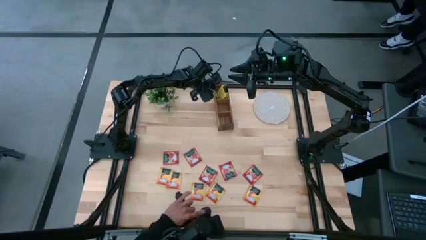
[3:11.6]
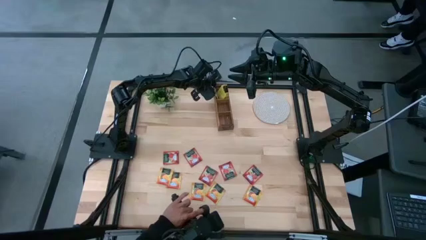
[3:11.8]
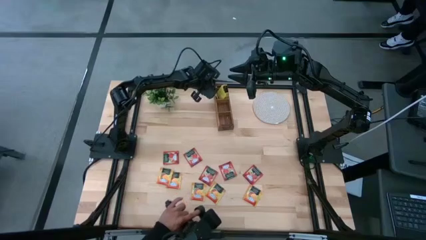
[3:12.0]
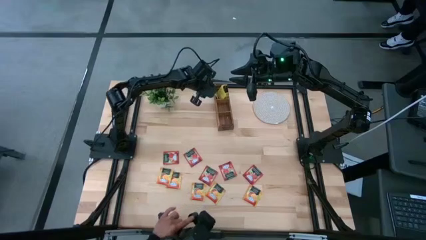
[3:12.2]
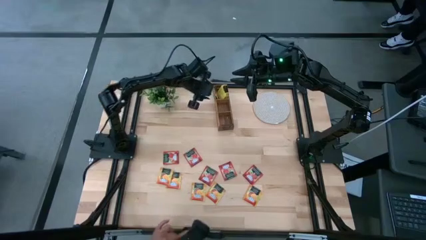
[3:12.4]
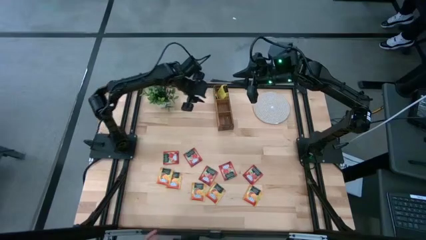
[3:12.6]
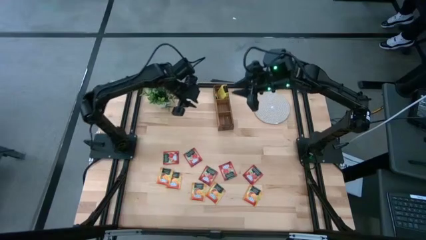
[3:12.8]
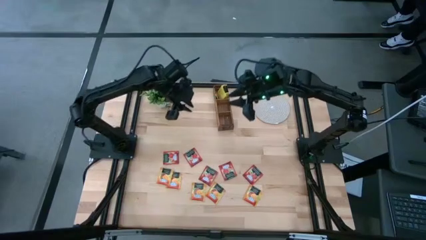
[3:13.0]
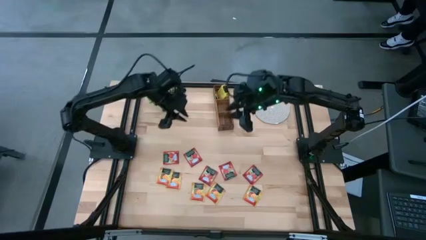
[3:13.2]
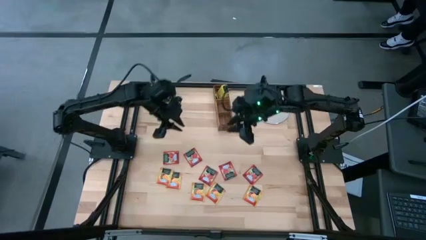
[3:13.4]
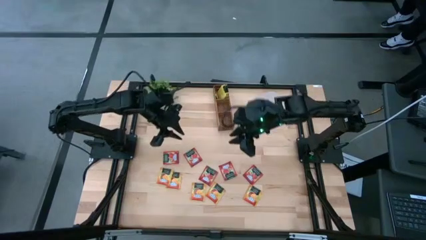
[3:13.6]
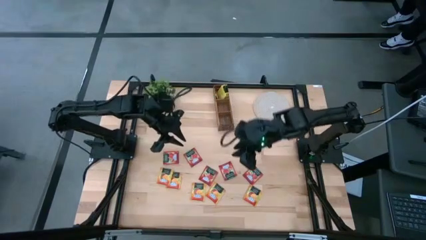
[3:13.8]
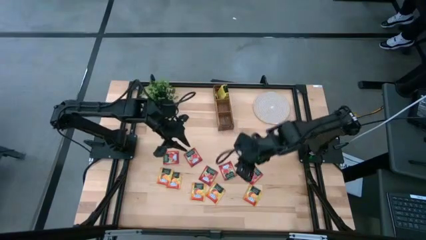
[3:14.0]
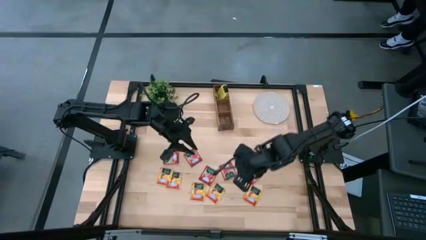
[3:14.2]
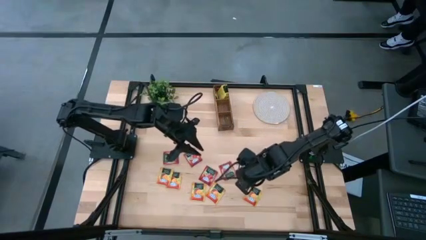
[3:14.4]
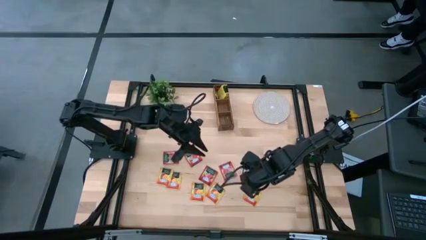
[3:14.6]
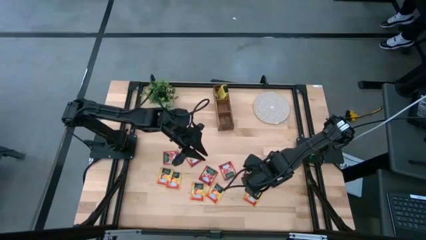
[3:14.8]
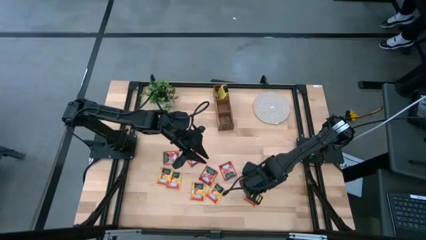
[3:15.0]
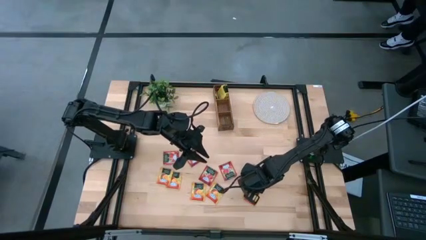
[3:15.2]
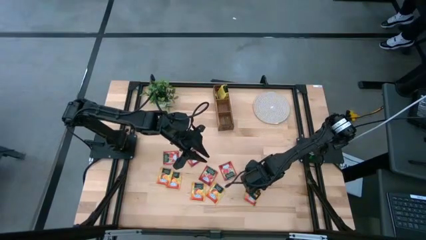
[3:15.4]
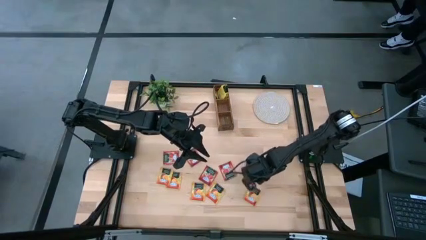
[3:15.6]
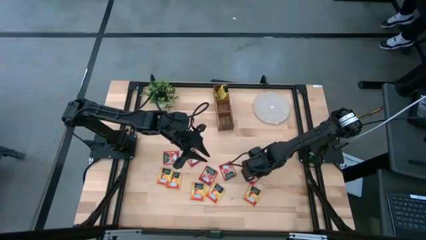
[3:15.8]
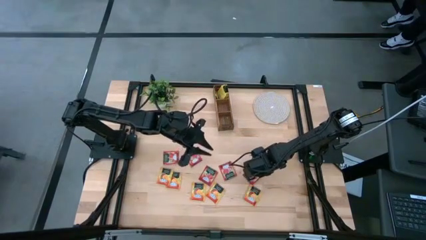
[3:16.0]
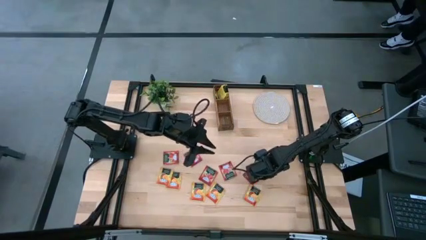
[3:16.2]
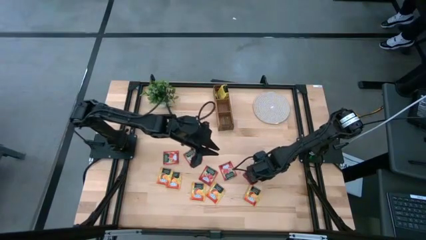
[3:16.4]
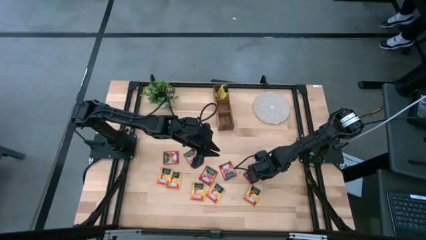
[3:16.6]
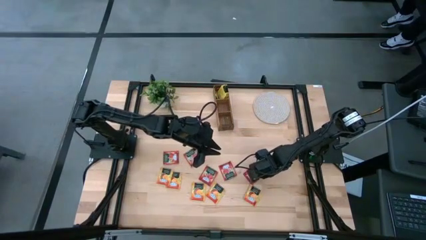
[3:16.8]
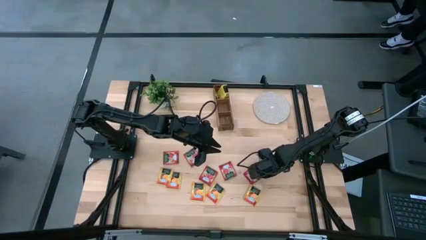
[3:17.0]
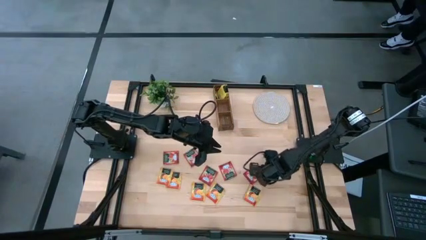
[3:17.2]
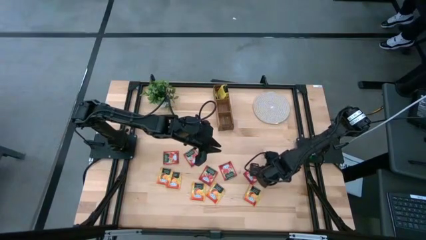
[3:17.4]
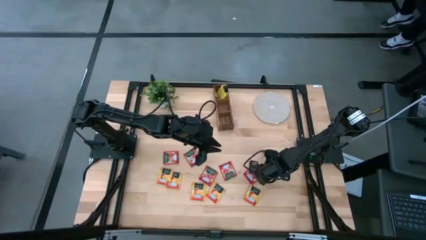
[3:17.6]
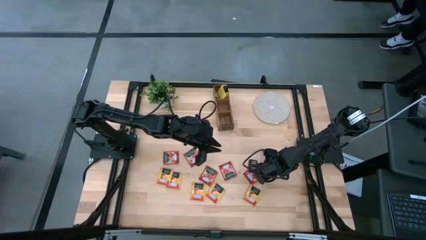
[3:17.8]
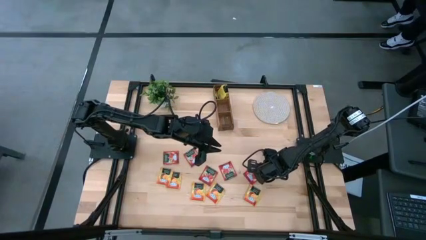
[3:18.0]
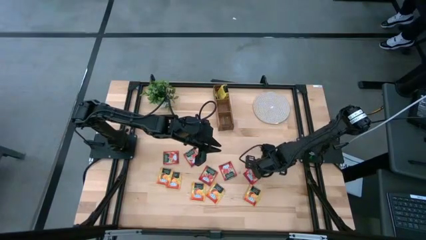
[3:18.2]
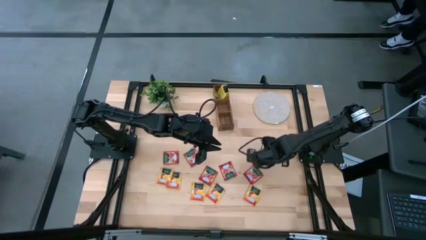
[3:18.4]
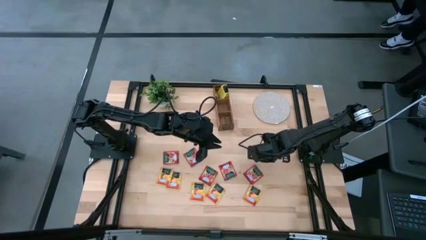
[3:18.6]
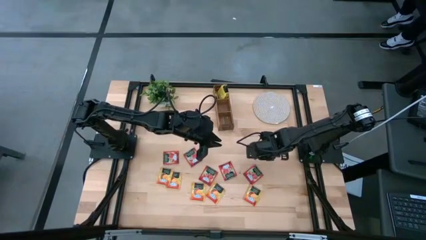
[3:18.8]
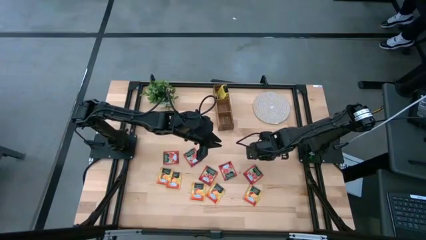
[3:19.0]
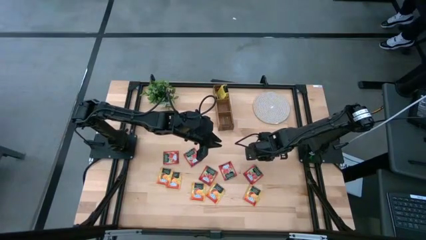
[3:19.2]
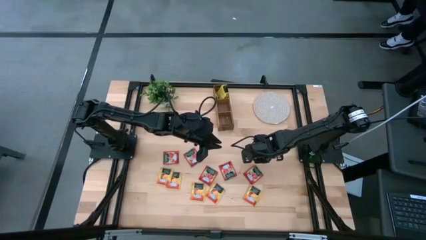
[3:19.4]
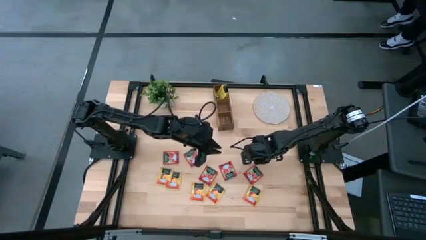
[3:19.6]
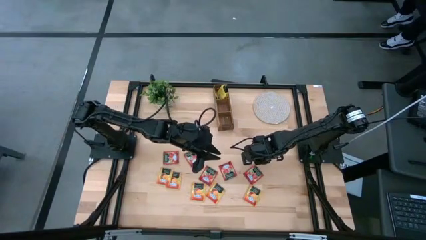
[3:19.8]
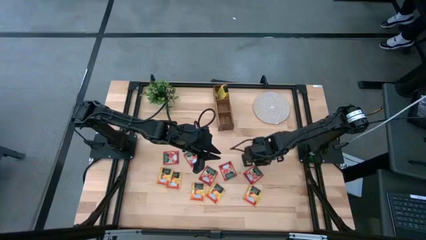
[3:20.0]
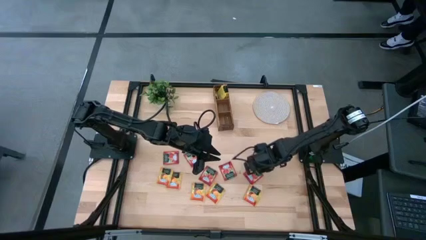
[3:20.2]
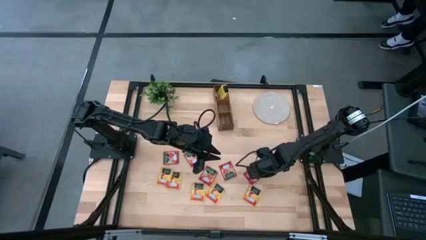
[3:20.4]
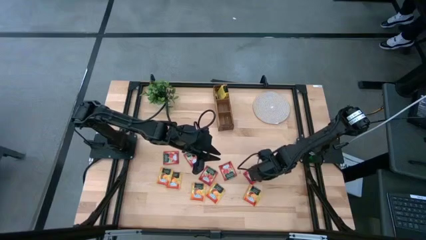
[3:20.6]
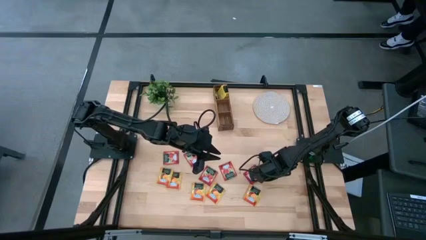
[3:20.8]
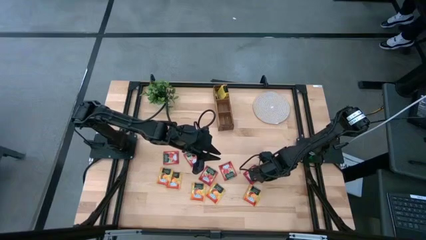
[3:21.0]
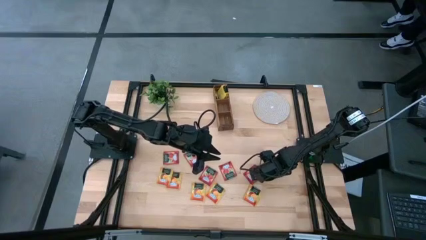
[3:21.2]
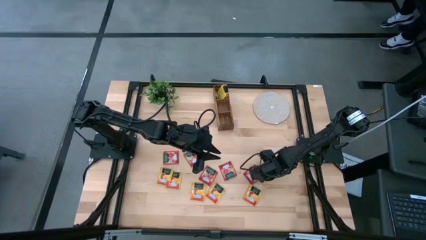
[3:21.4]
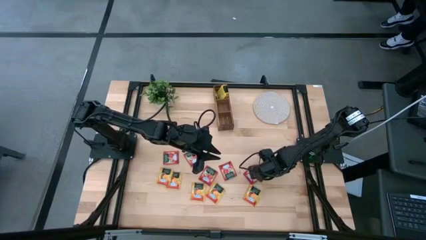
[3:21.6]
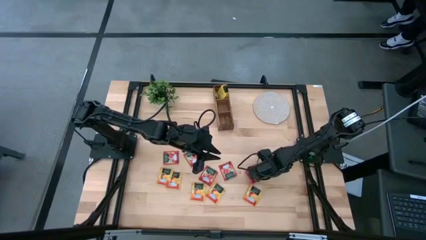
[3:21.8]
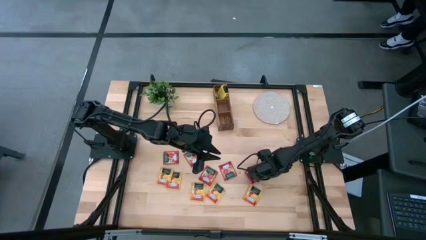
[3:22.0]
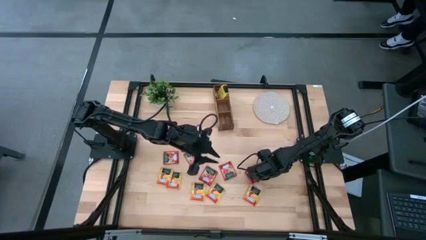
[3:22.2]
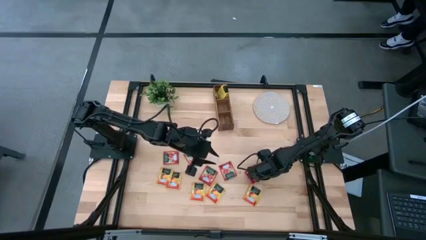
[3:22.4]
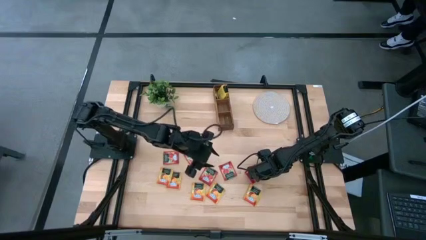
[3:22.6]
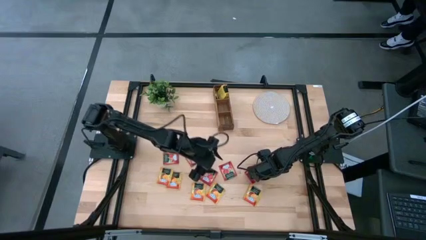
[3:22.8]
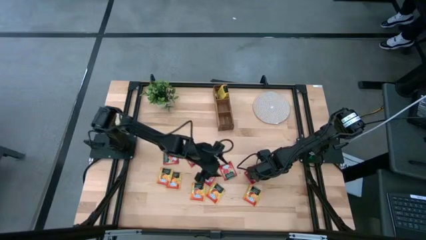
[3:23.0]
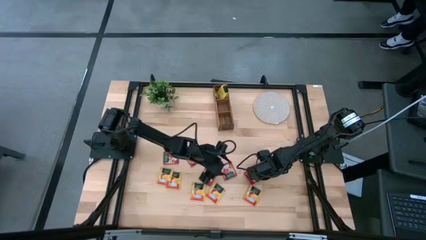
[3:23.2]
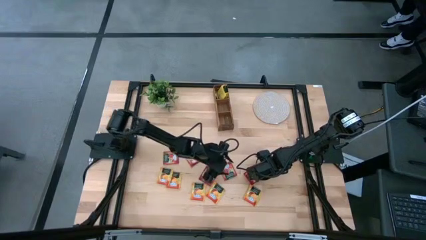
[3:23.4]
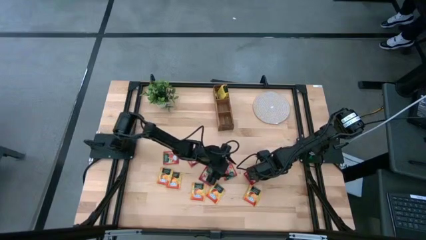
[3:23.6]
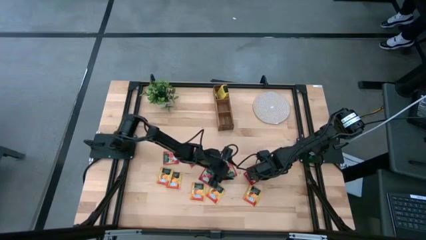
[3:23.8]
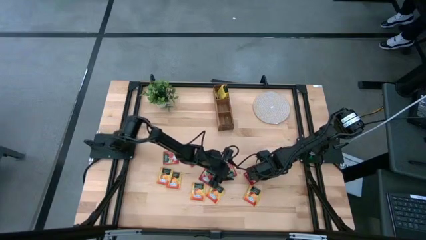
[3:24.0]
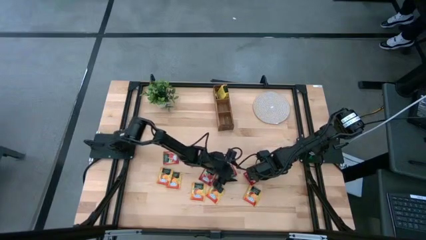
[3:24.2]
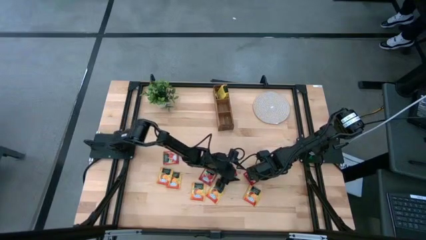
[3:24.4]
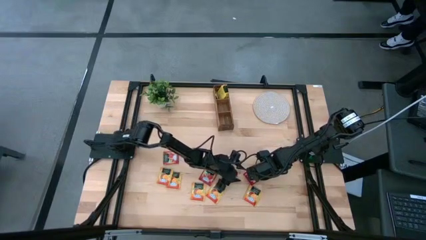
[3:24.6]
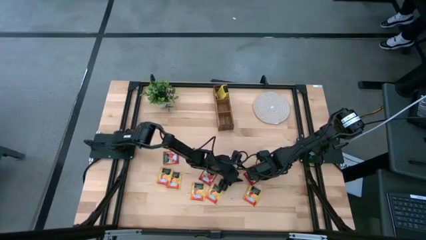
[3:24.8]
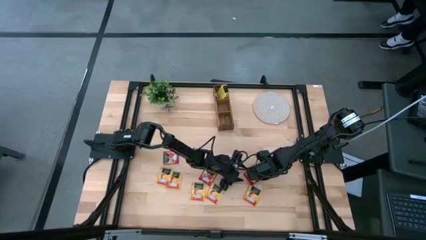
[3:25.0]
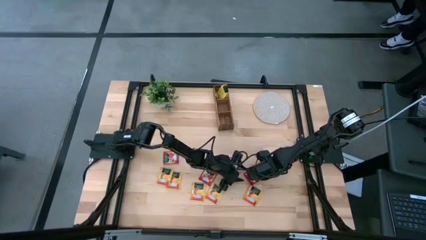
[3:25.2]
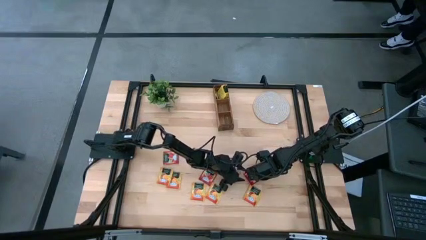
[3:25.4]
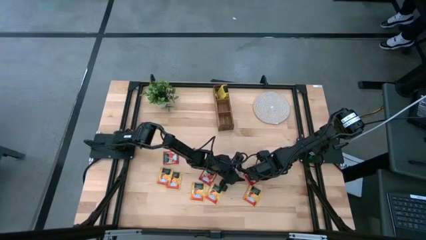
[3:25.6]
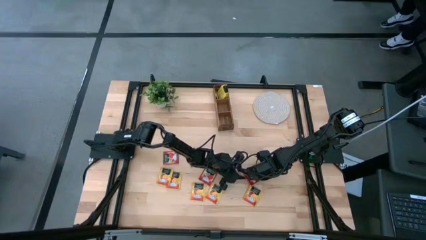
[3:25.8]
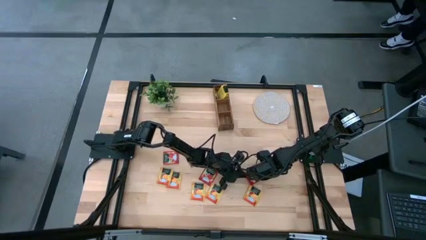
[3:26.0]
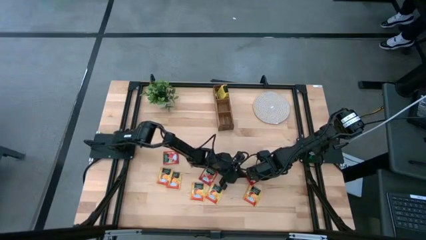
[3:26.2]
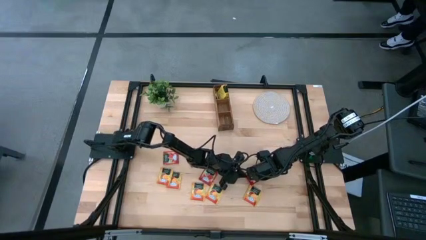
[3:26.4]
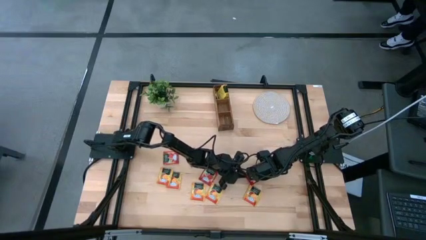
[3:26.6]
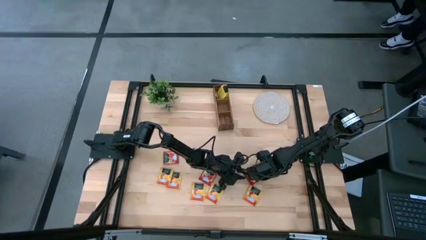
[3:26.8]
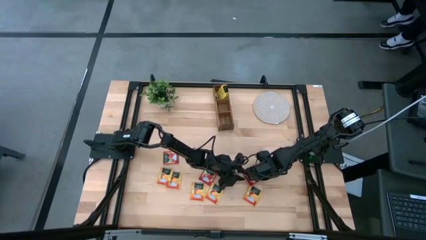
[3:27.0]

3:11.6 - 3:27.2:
Task: Pick & Place Tea
Put the red tea bag into the middle section of the wooden organizer

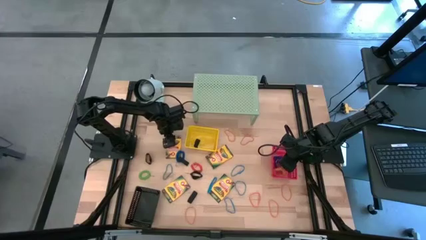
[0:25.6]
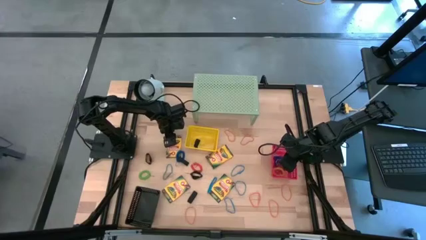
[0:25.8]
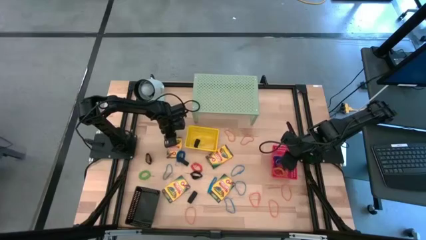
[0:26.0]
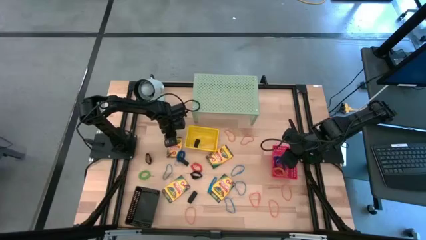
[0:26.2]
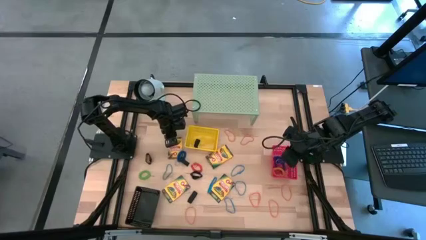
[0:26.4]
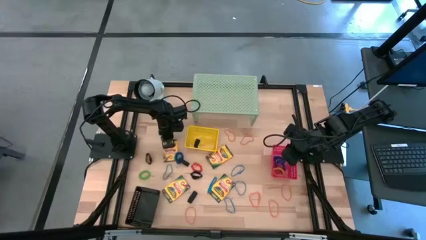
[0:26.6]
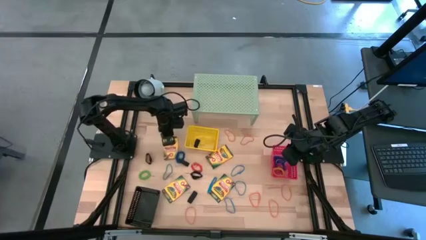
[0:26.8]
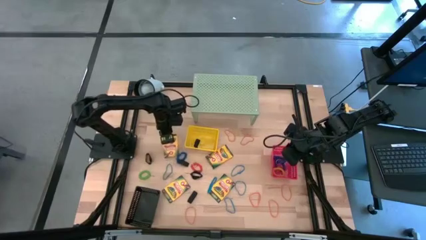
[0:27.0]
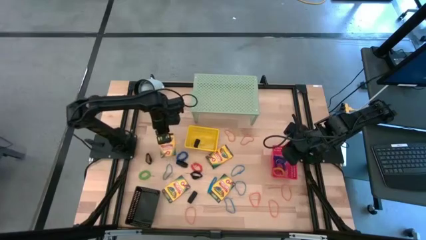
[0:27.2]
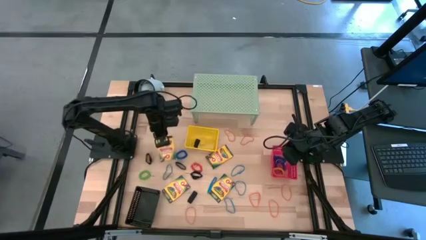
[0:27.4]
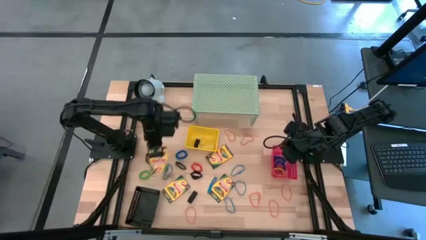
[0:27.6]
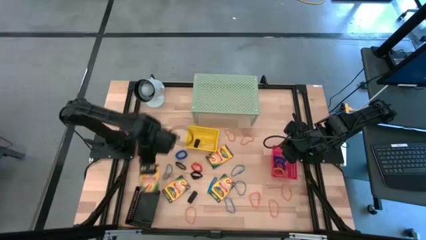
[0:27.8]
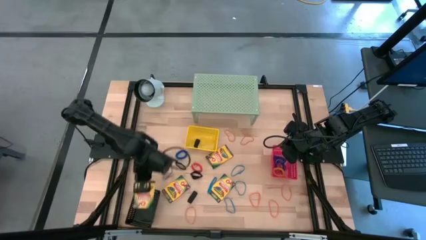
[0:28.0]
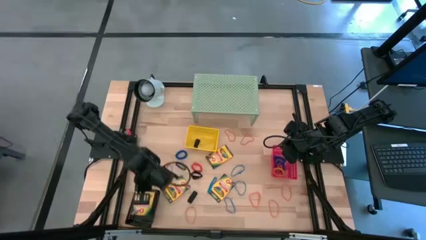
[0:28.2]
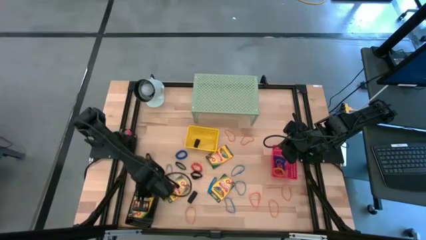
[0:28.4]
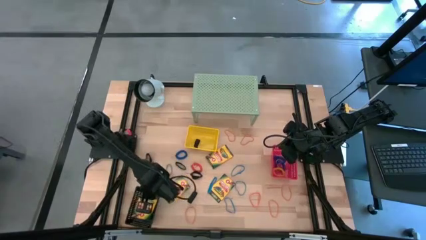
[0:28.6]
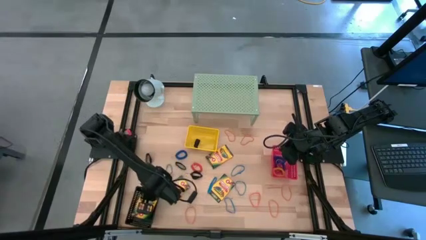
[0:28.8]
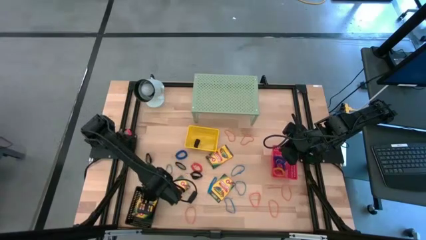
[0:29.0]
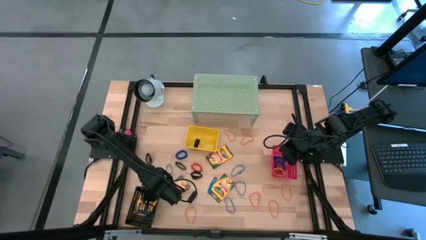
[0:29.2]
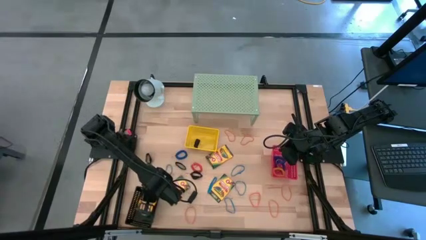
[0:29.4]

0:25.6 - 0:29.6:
Task: Pick & Place Office Desk Supplies
Put the crayon box into the black bin
